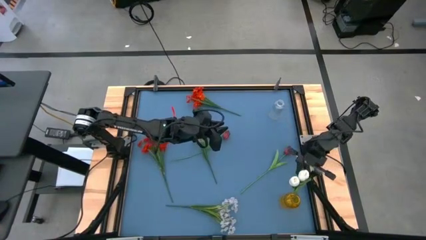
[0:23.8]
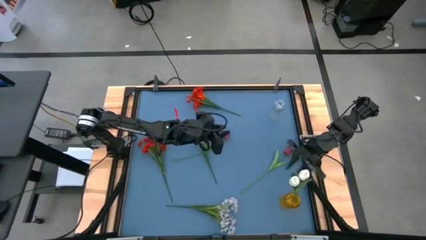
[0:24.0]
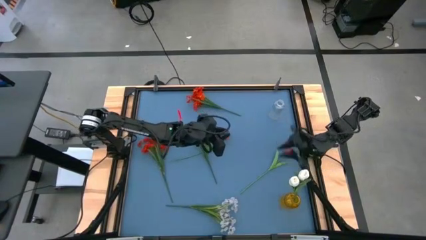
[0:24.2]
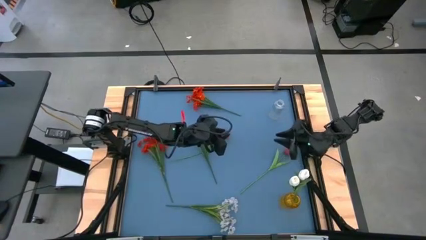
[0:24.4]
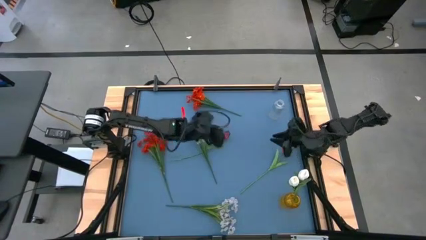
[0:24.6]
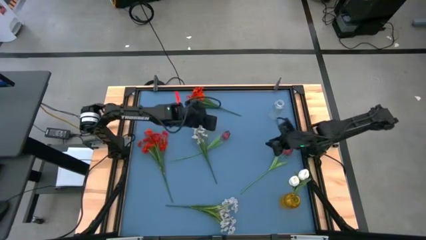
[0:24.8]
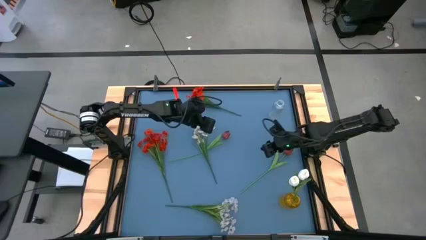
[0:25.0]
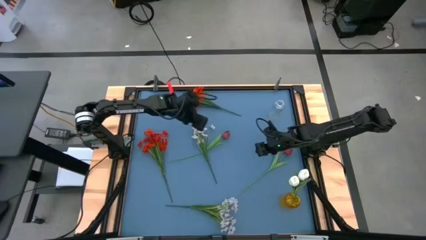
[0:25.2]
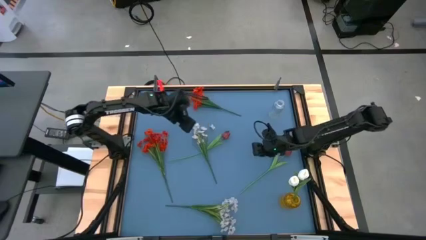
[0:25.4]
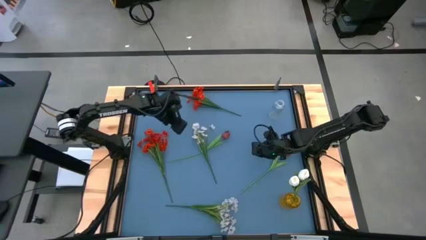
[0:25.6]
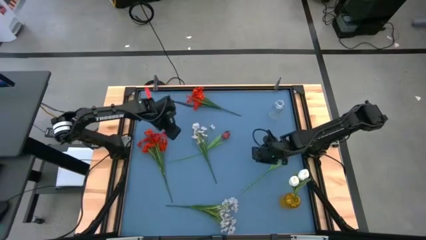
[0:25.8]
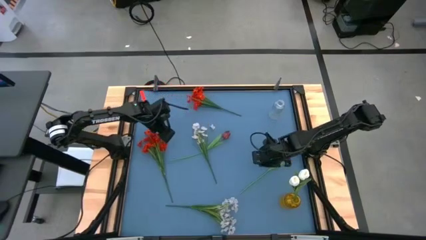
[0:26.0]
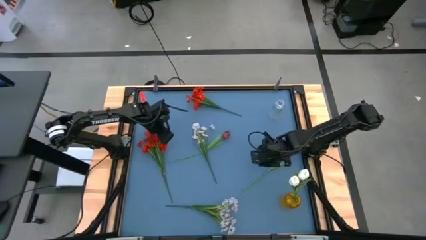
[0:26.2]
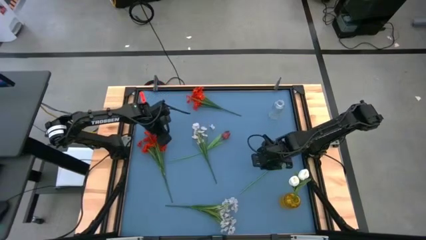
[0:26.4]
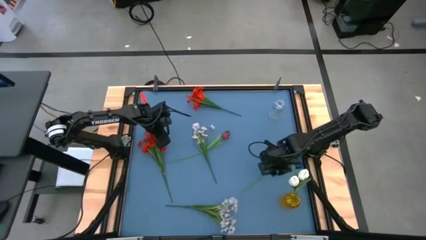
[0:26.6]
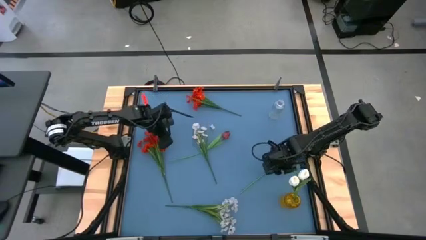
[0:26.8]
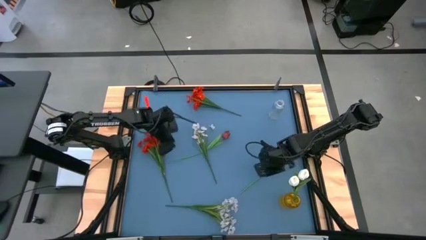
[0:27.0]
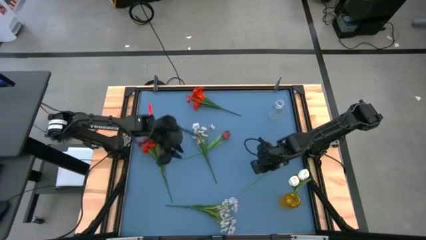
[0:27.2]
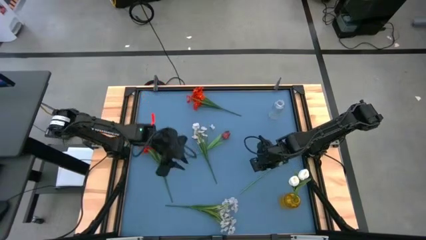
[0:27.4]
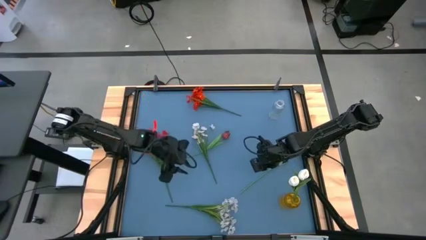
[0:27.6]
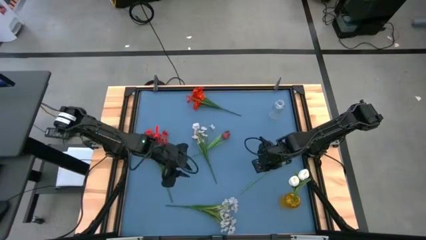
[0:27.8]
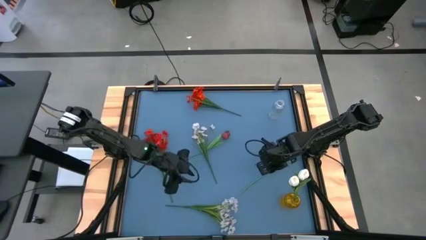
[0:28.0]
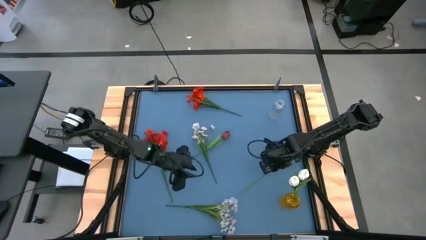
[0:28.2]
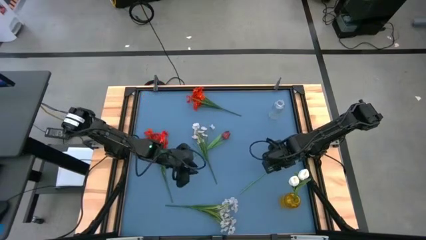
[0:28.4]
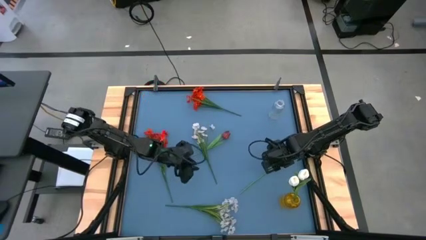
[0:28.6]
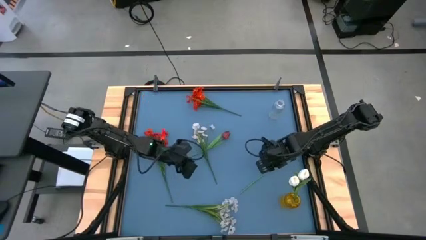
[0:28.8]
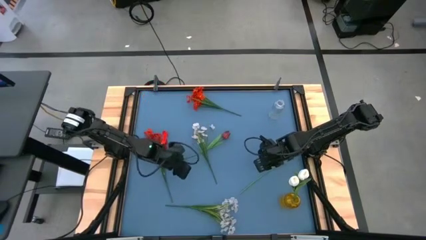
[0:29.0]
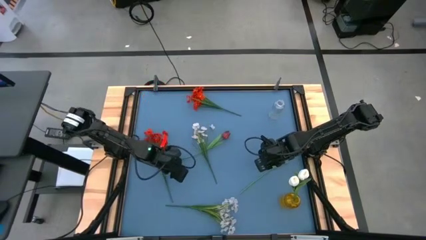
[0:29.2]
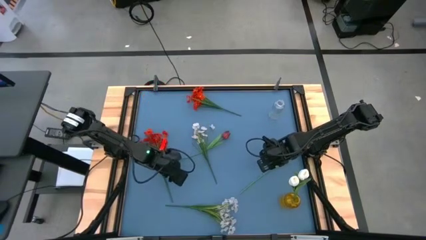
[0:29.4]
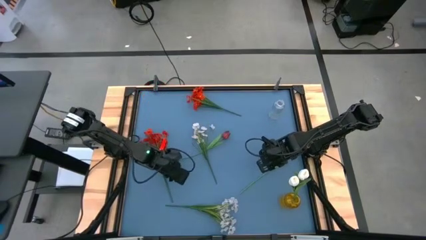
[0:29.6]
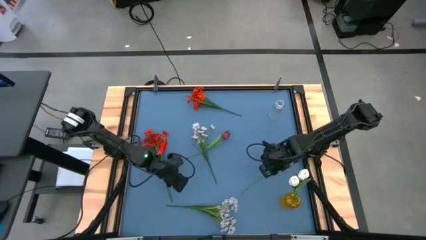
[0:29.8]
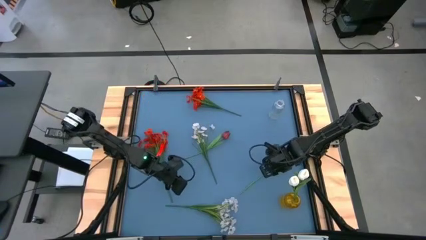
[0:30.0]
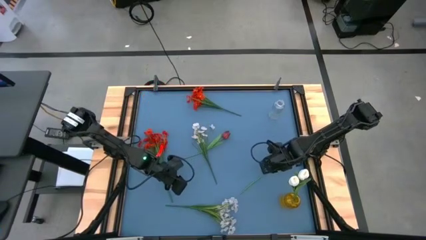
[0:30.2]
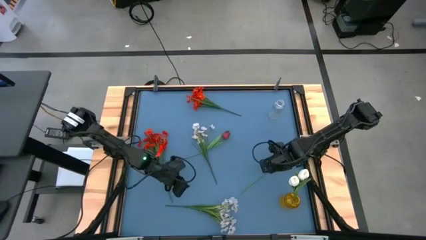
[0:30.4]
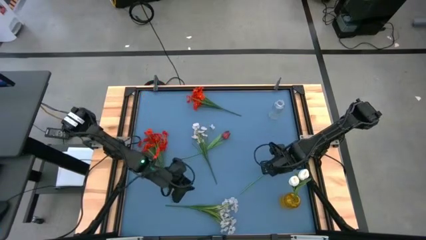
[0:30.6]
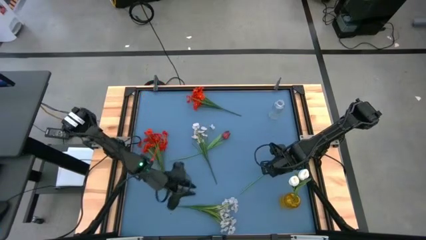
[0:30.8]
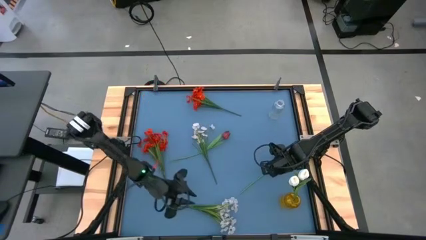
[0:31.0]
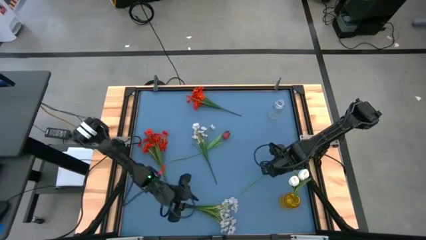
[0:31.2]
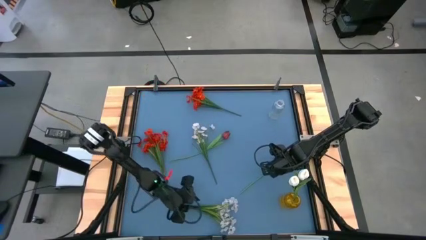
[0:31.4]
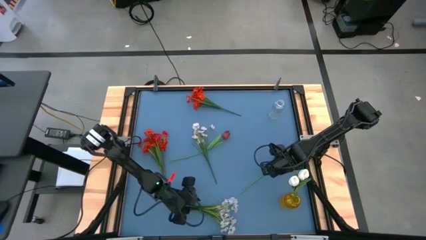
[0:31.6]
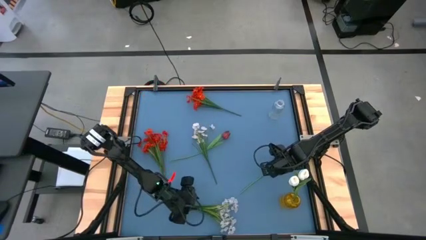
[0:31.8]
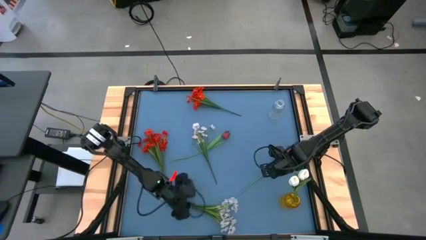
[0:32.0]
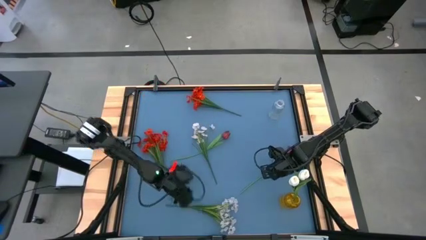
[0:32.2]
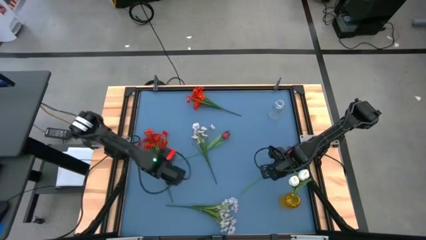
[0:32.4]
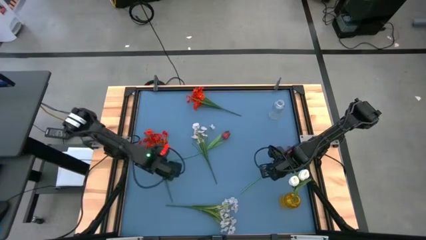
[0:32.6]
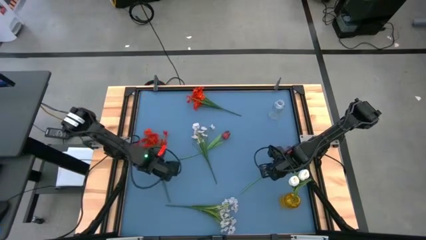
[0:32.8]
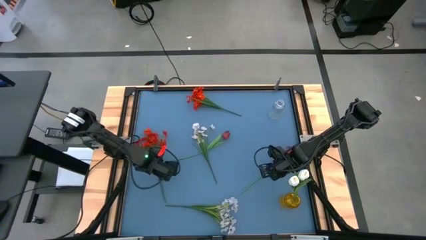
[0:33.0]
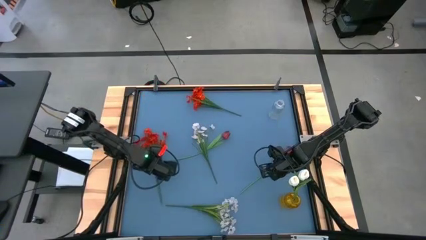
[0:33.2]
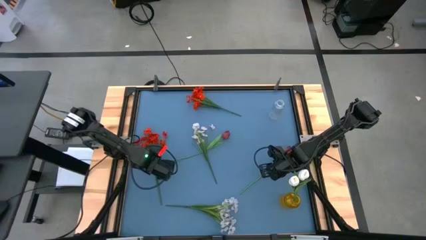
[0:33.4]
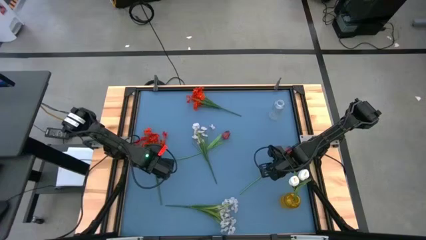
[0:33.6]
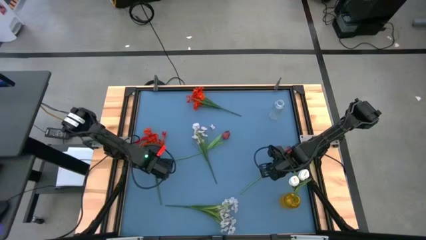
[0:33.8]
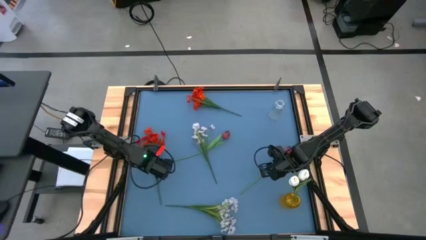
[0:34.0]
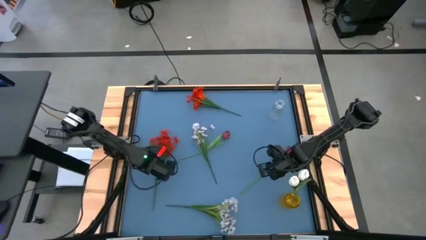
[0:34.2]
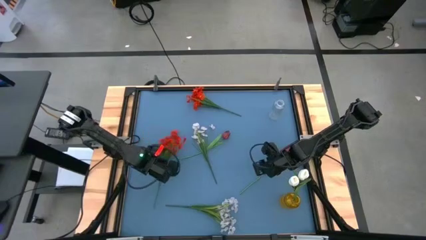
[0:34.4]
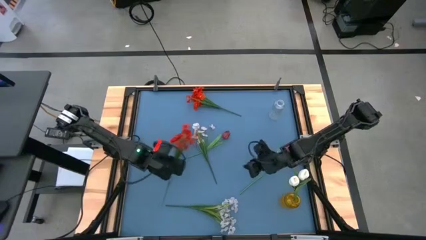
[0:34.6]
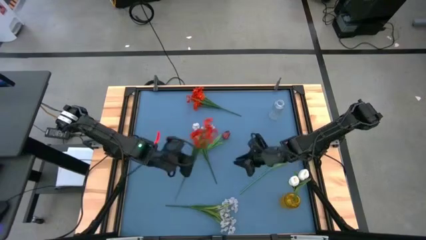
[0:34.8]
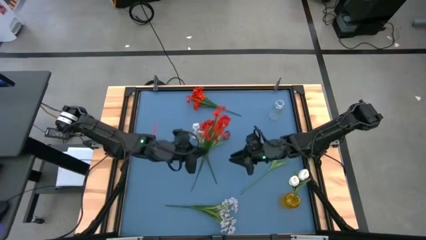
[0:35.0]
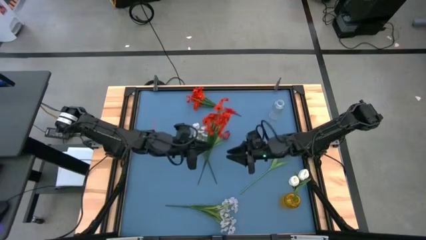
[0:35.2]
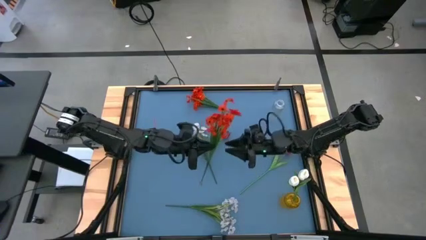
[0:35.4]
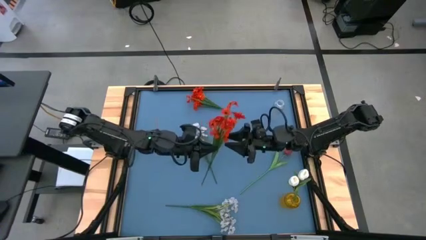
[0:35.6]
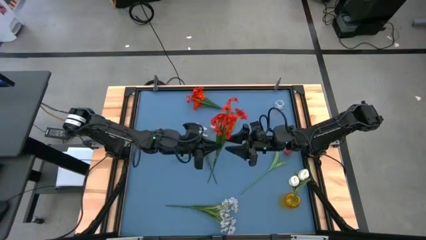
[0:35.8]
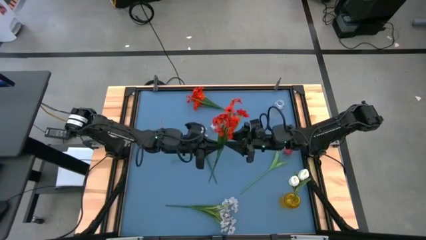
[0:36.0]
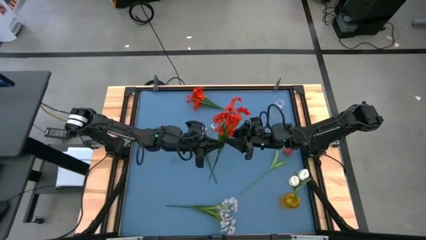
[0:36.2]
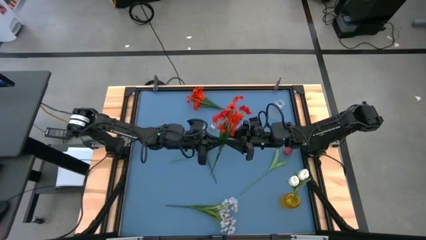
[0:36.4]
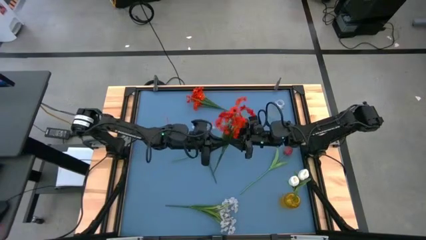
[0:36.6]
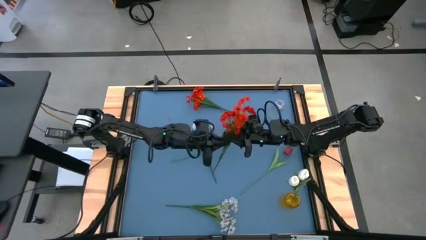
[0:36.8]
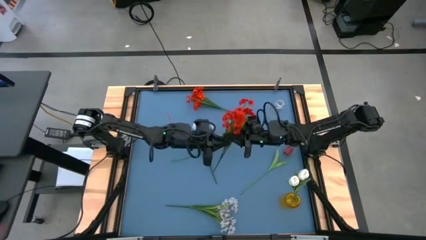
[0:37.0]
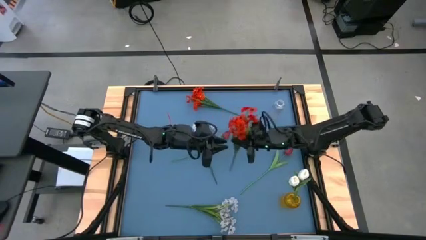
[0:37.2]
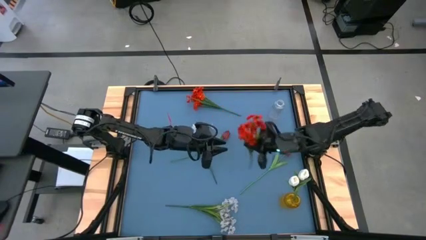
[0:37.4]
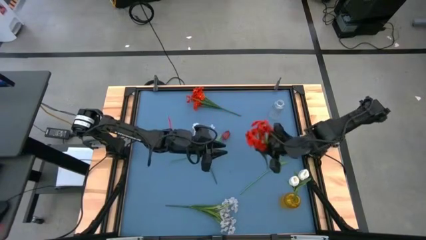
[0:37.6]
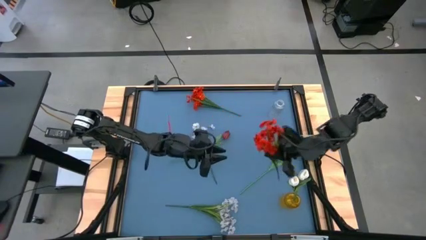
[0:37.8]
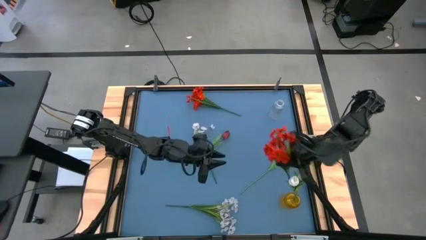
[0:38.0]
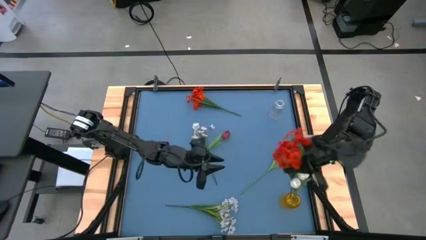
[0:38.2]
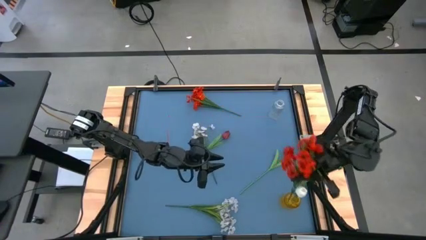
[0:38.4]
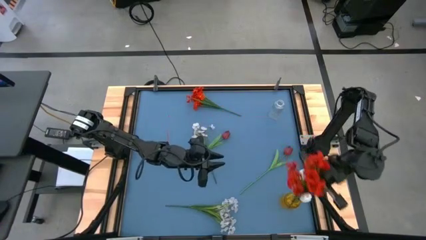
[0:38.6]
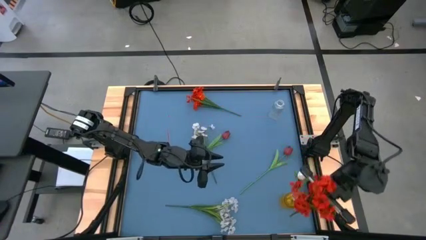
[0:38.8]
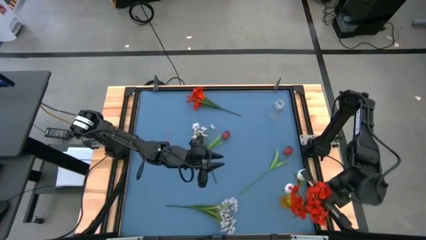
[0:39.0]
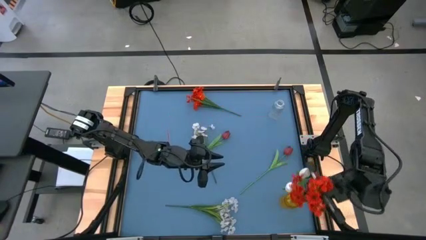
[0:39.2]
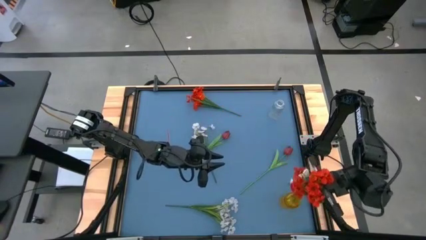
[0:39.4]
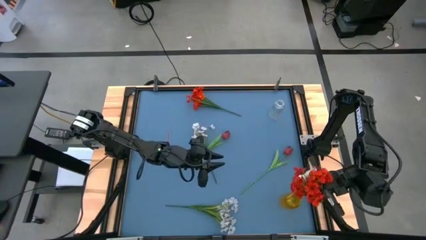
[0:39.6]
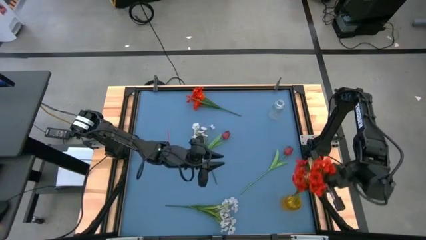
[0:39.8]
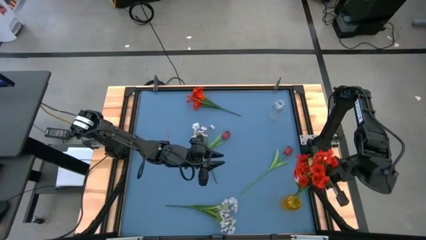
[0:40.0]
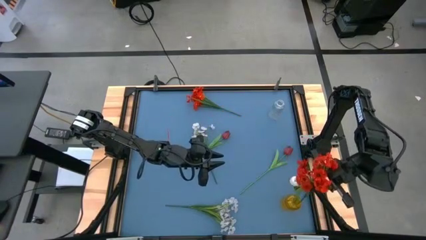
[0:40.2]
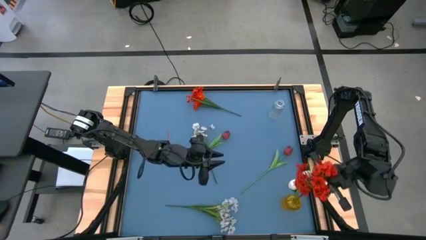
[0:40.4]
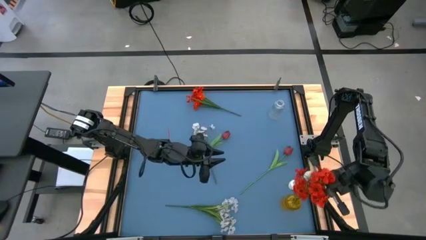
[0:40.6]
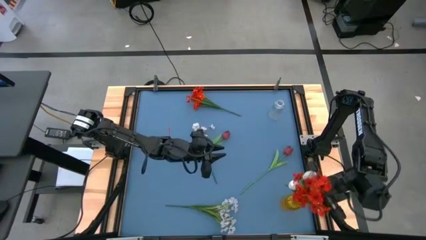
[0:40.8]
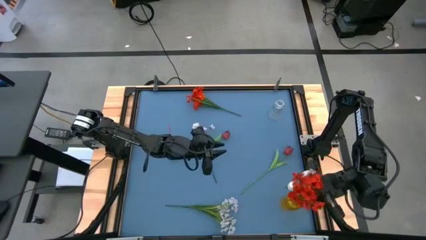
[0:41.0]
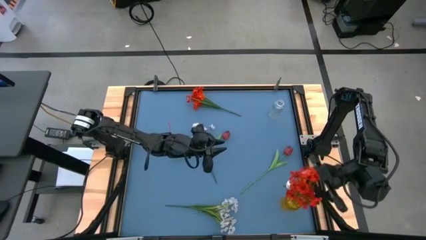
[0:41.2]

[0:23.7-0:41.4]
Task: Sort flowers into vase by color
Put the bottom red flowers into the yellow vase
